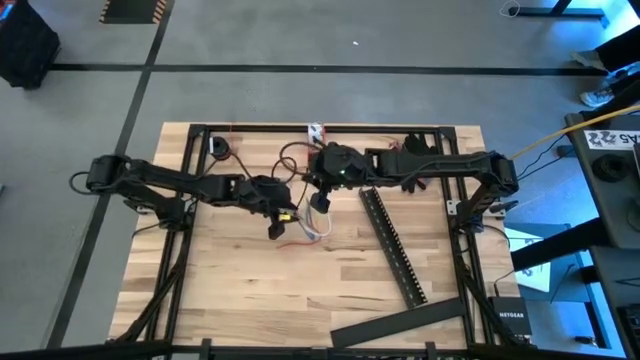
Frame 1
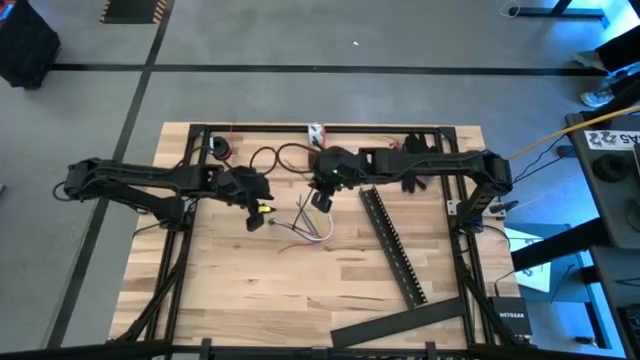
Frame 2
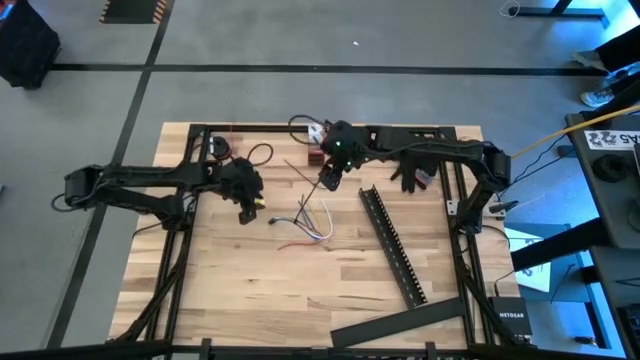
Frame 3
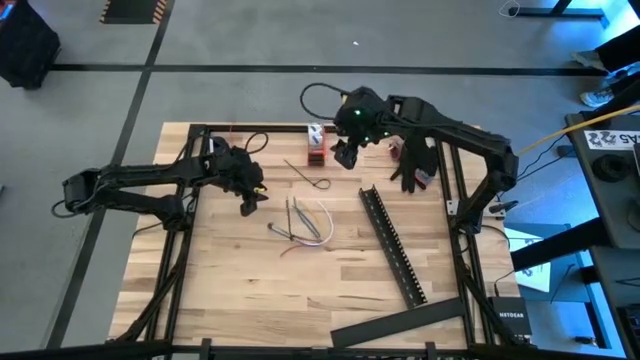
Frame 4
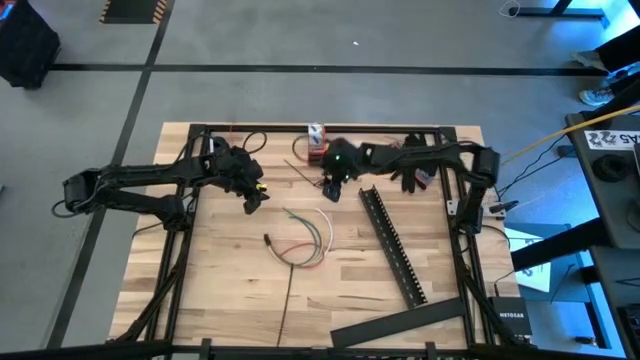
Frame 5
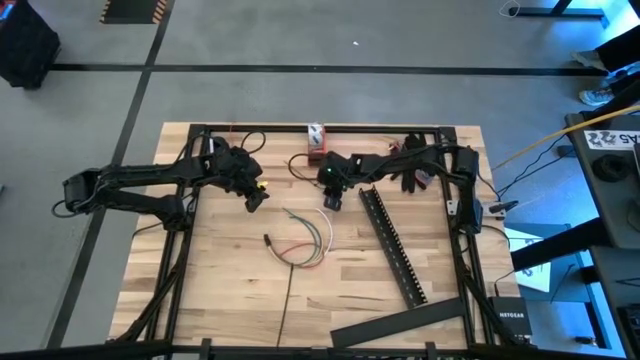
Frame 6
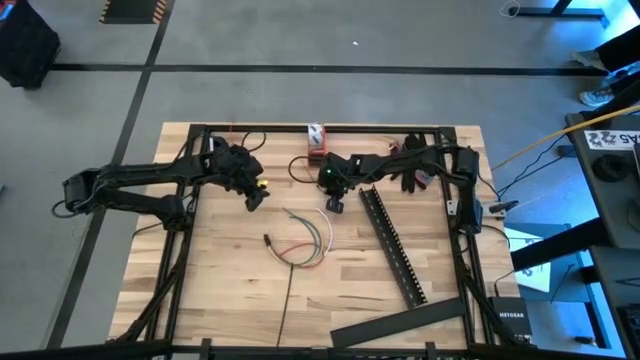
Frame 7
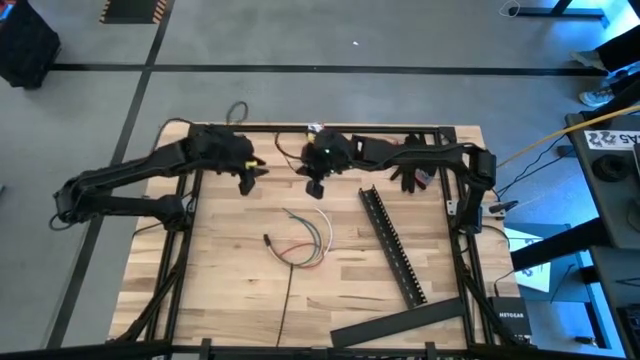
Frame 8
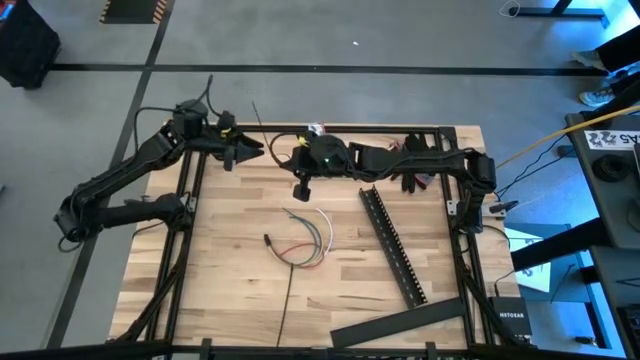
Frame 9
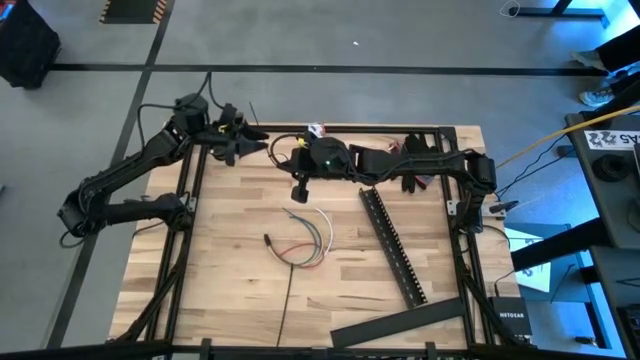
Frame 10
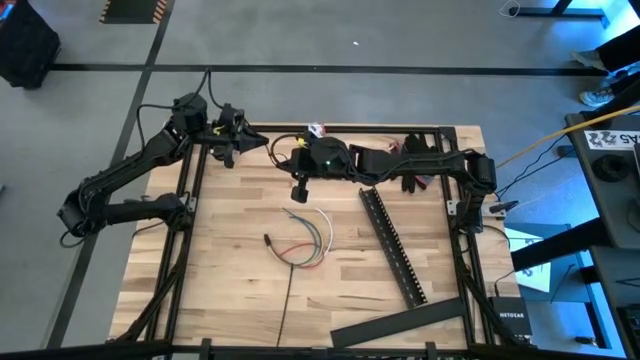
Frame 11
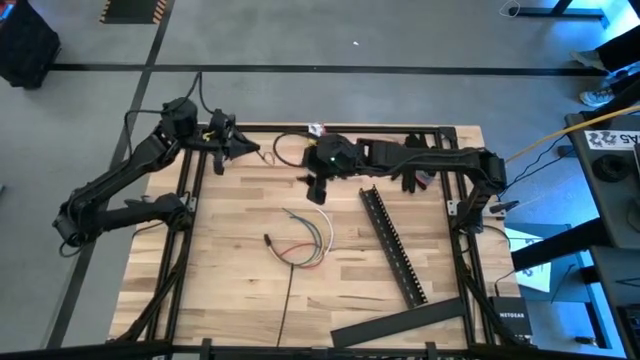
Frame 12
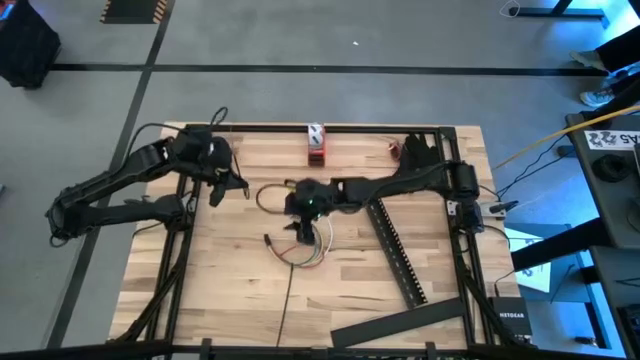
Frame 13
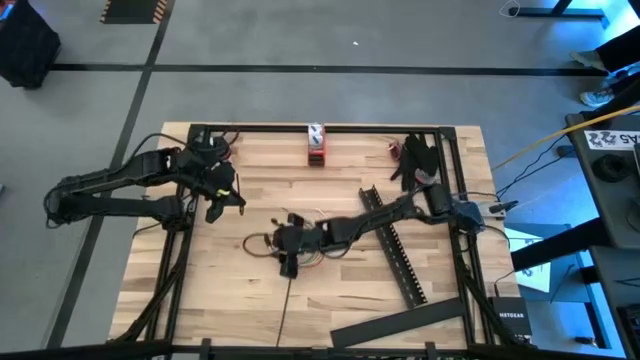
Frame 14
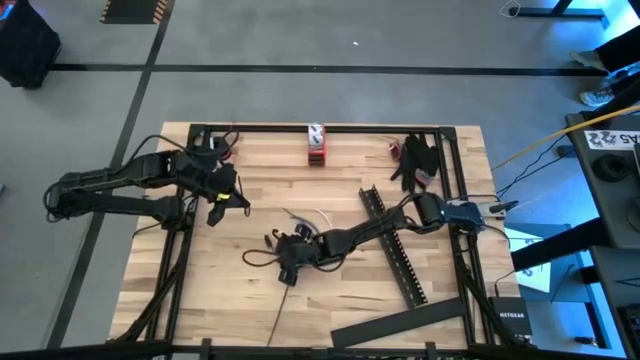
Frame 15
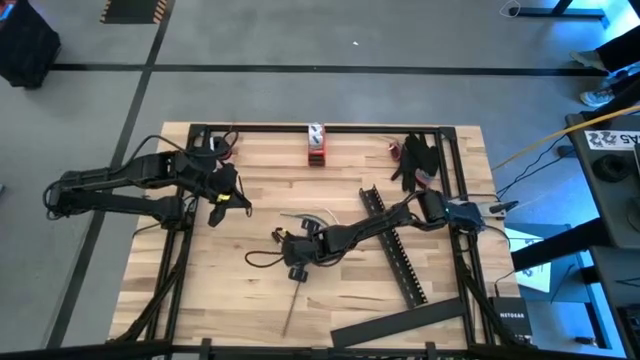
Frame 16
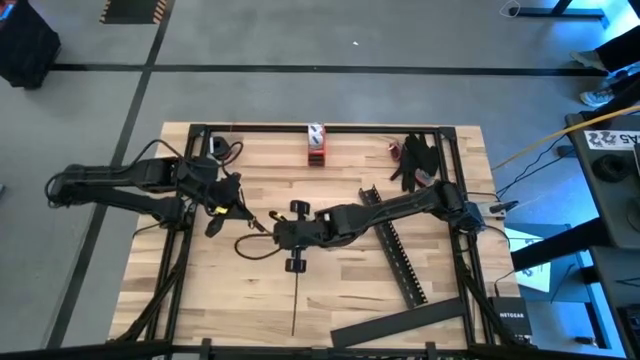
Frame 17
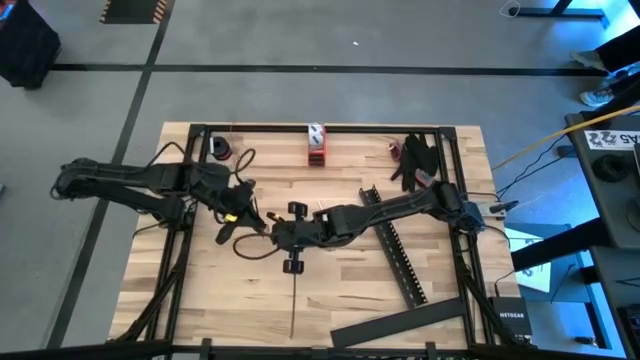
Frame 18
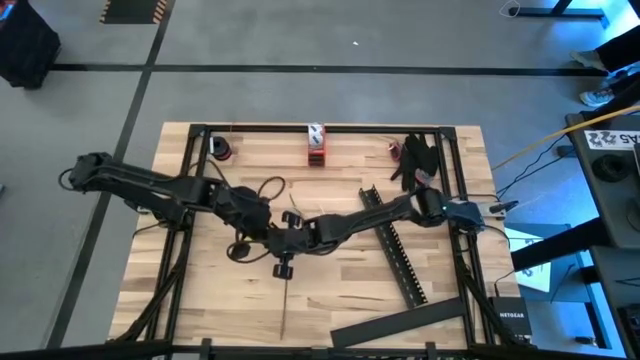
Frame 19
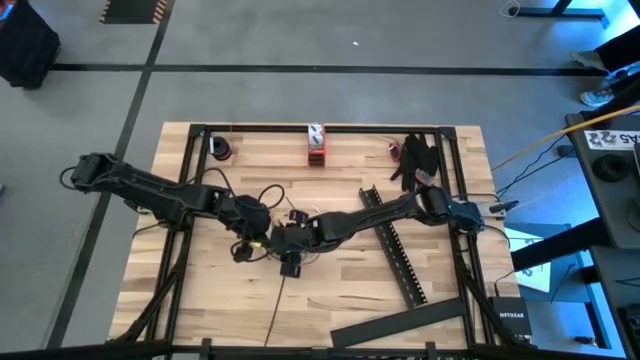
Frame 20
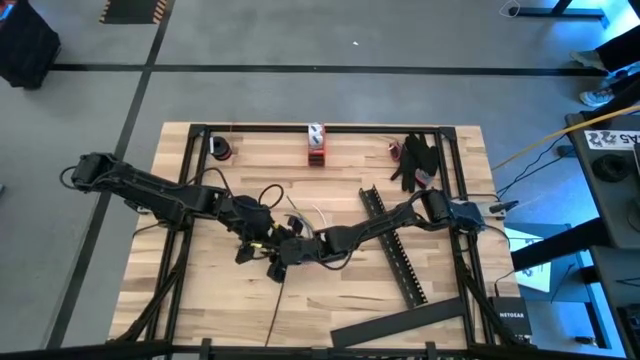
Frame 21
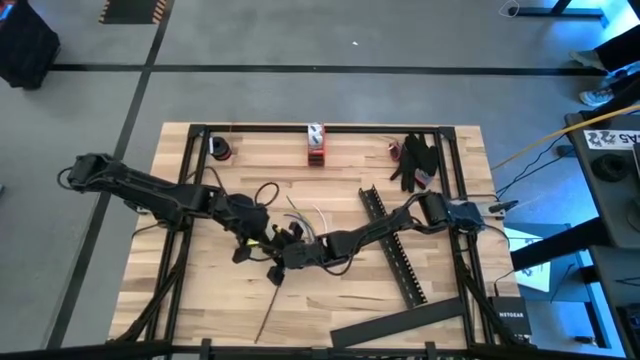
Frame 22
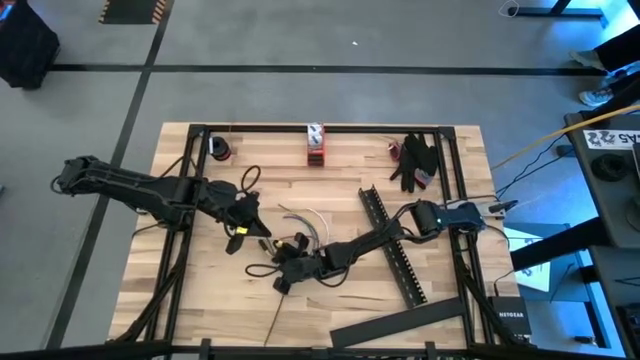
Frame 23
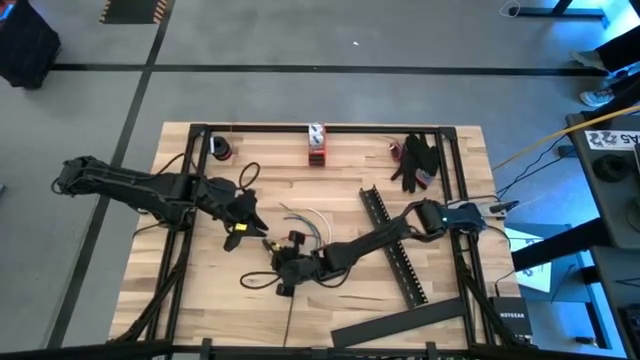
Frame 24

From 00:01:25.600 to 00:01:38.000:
Task: Ziptie cables
Wrap the black zip tie on the cable

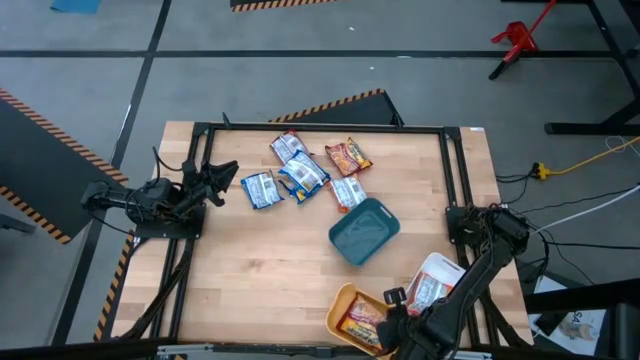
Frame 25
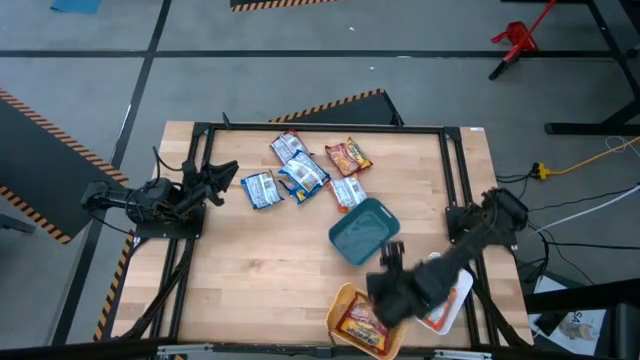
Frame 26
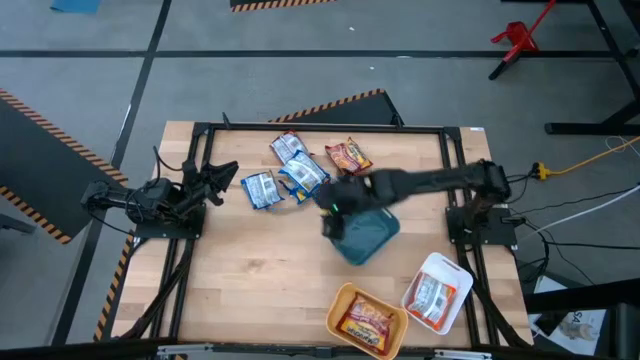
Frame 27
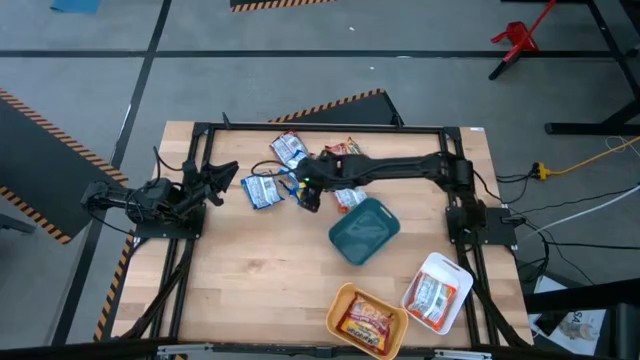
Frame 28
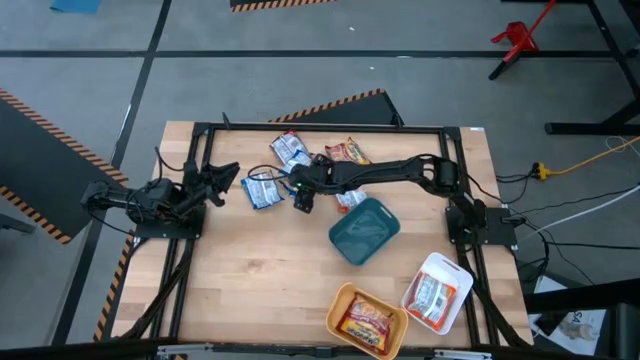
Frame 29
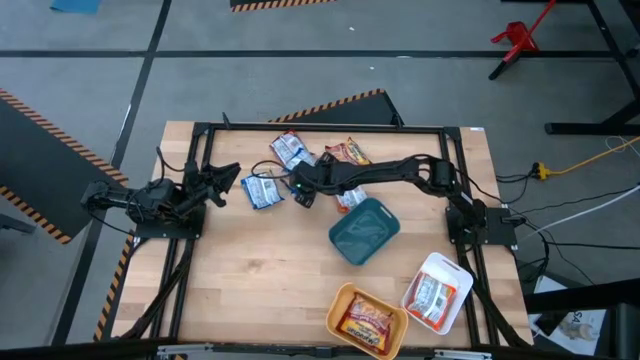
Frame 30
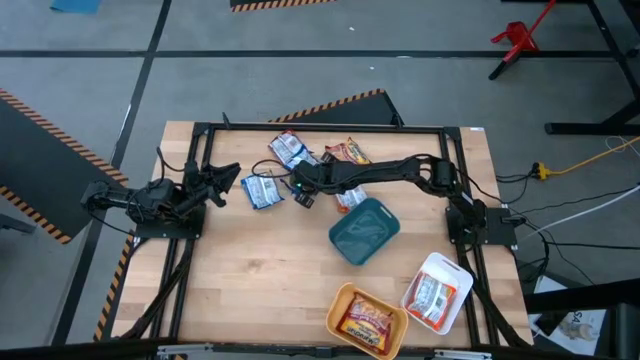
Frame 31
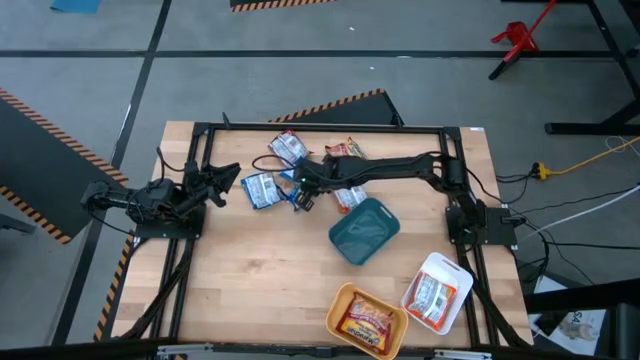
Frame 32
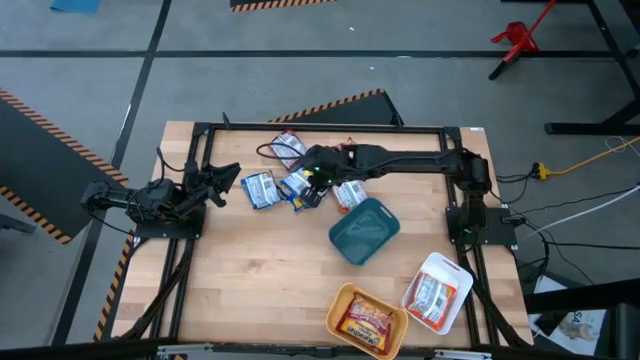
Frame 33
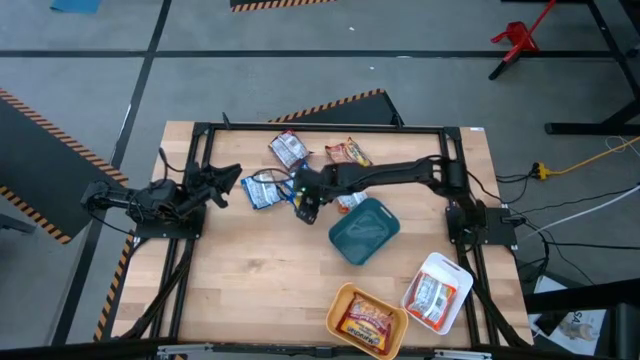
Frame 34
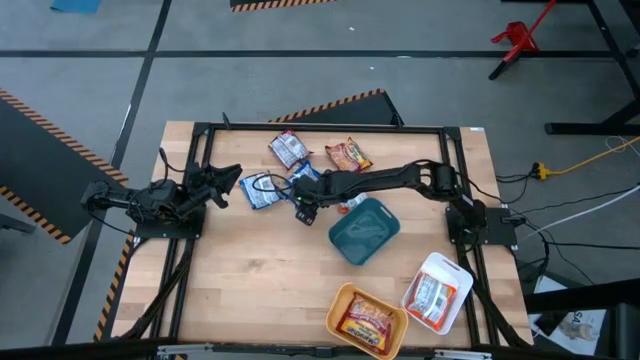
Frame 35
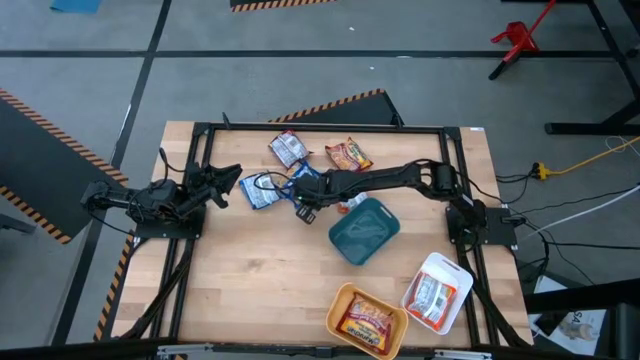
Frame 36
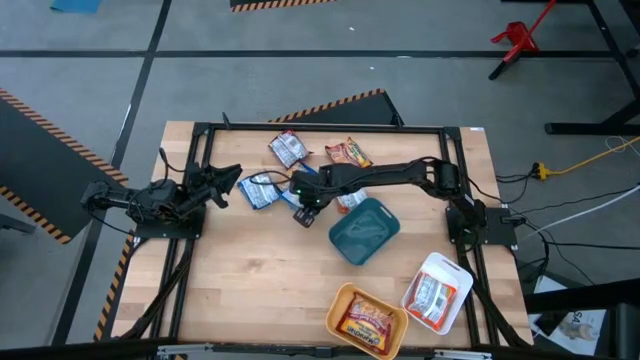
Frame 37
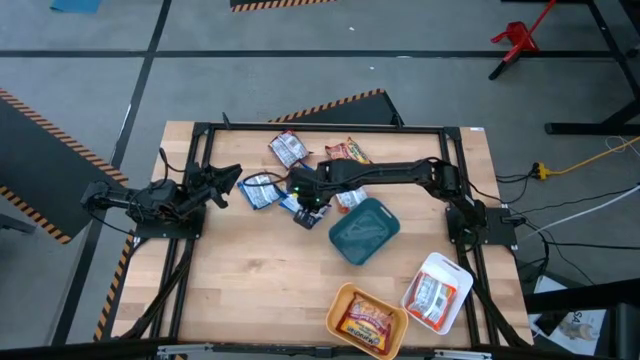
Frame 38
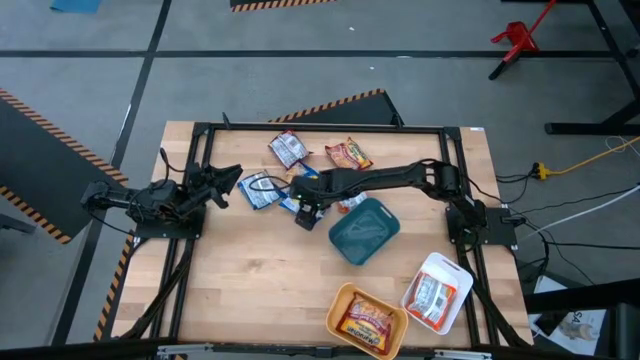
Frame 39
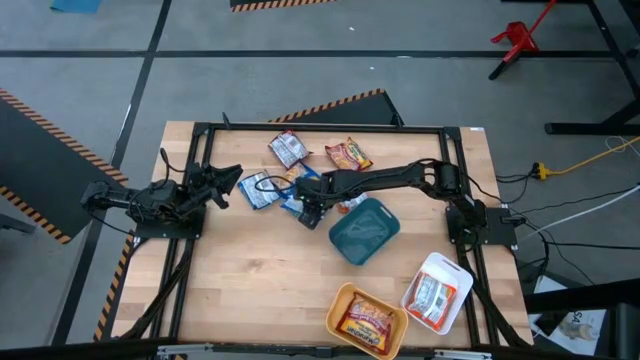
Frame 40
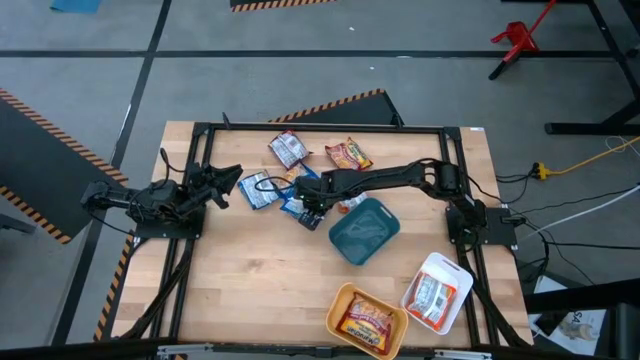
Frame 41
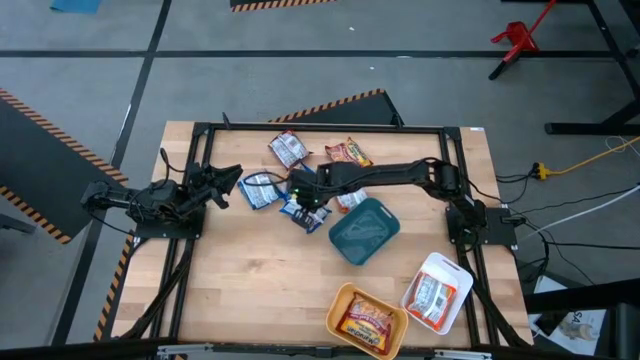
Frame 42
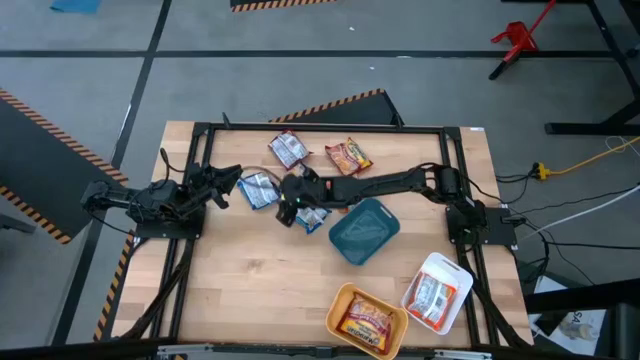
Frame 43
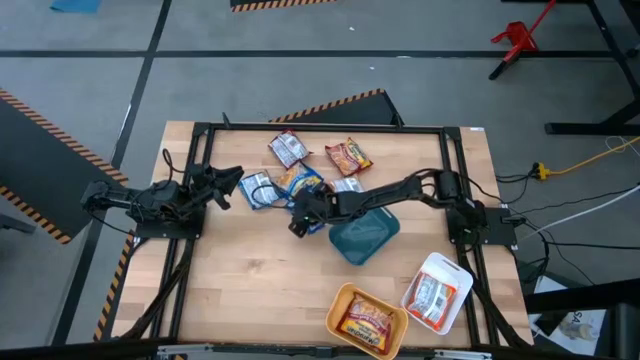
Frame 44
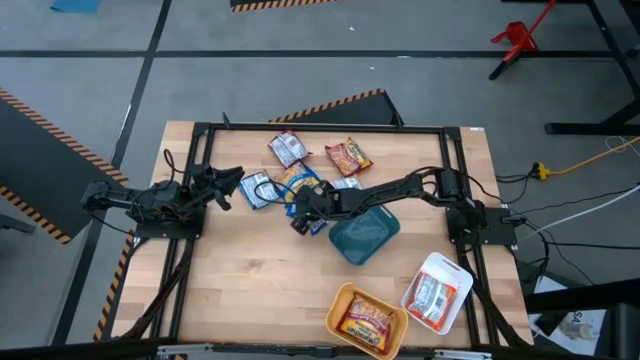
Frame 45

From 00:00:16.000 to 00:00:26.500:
Task: Sort Maruchan noodles
Put the top blue noodle pack into the green bin
